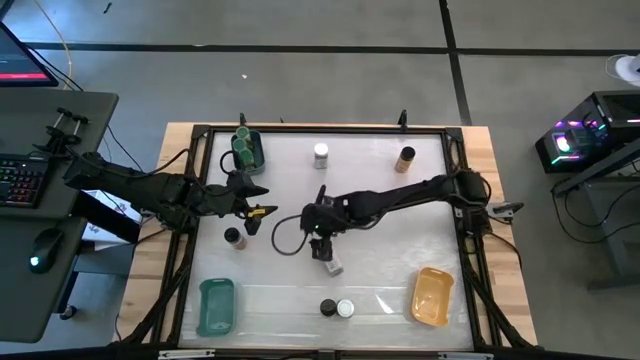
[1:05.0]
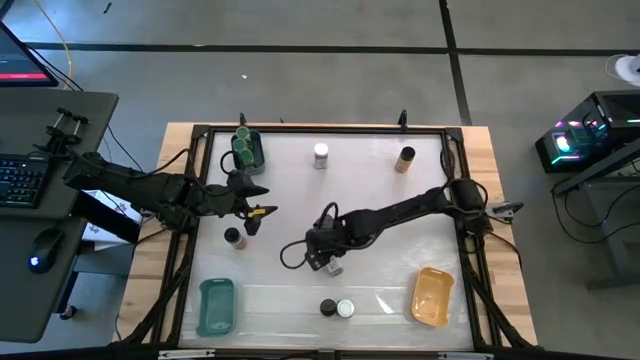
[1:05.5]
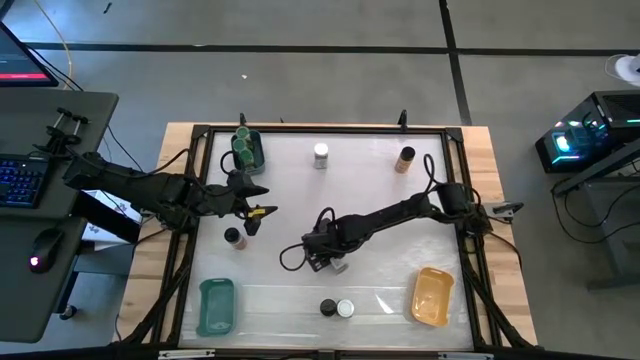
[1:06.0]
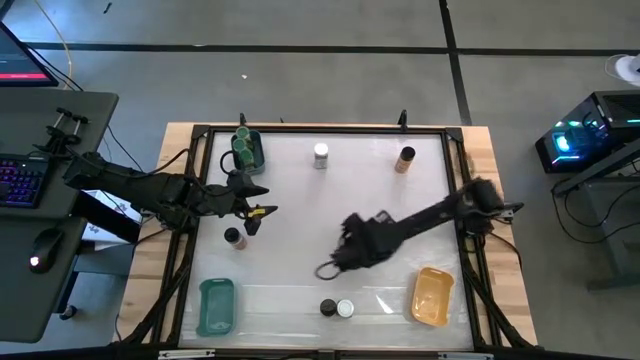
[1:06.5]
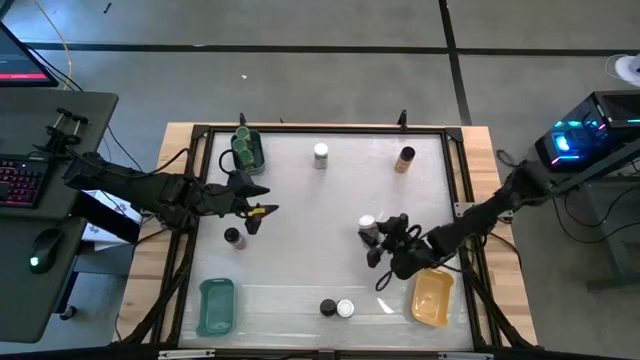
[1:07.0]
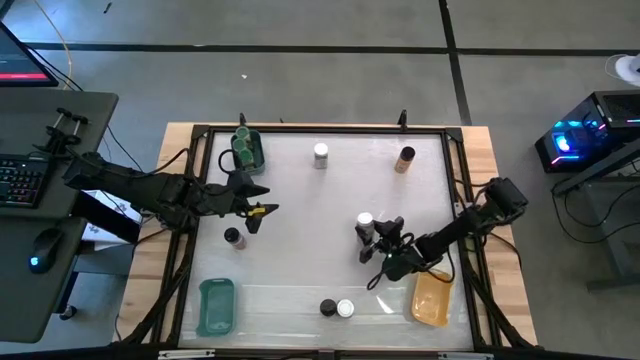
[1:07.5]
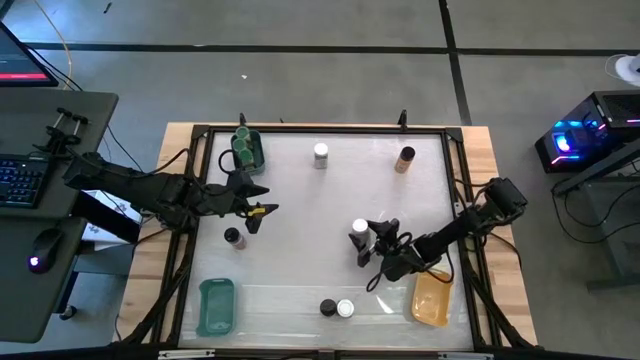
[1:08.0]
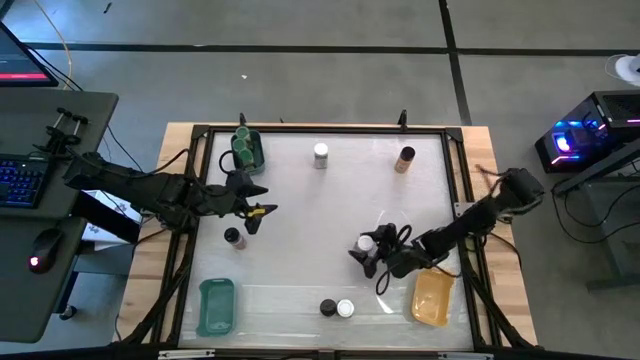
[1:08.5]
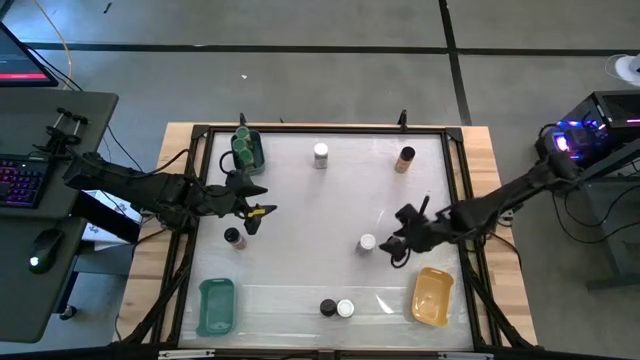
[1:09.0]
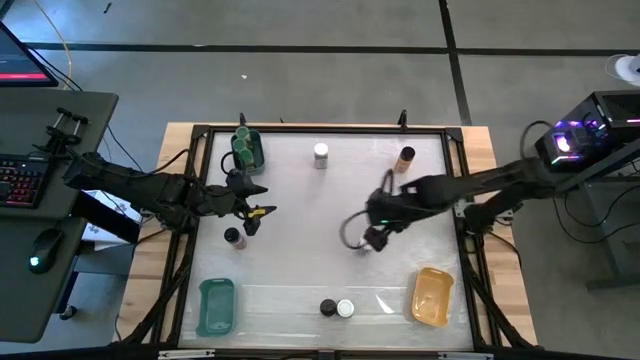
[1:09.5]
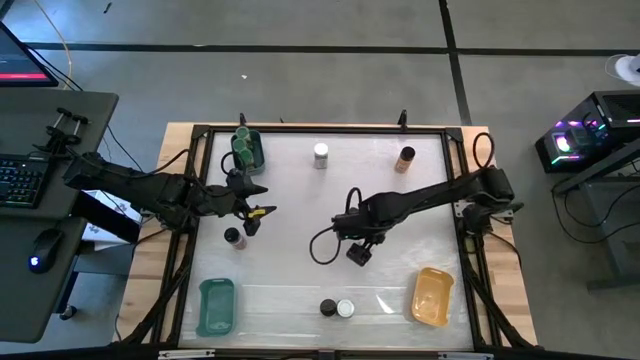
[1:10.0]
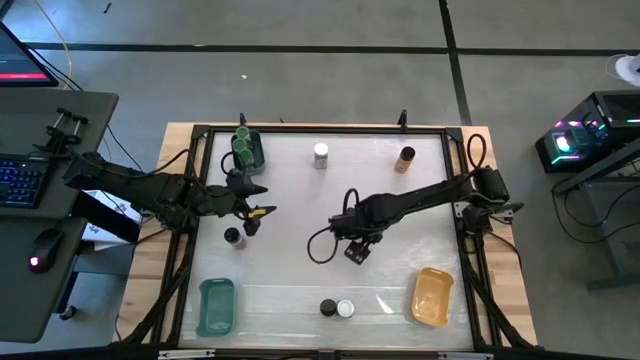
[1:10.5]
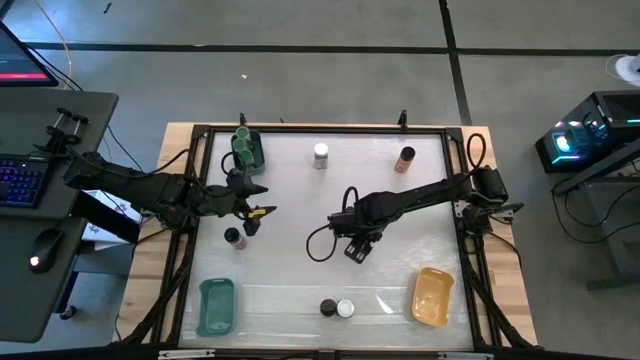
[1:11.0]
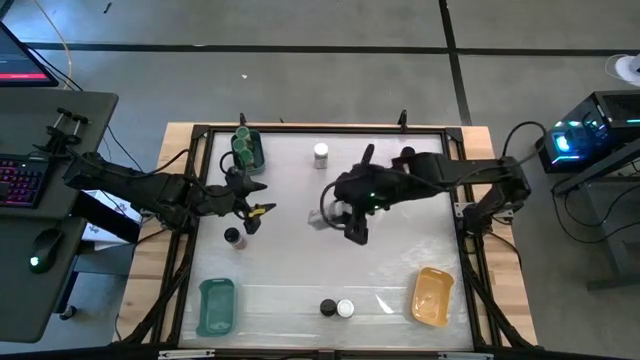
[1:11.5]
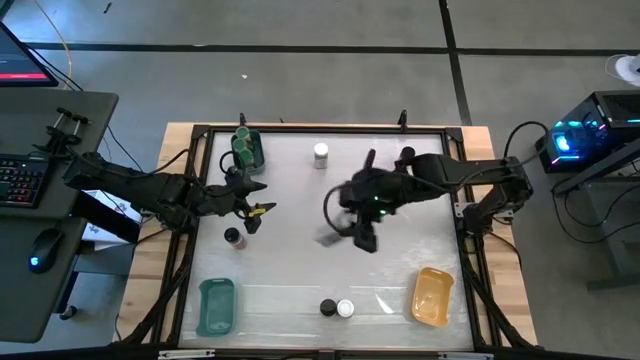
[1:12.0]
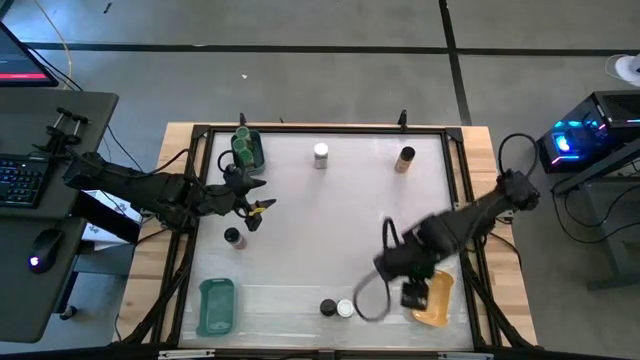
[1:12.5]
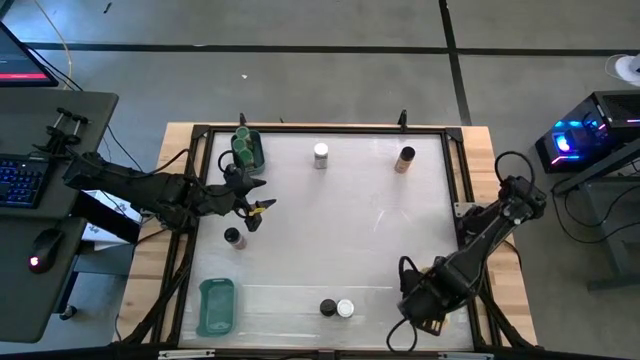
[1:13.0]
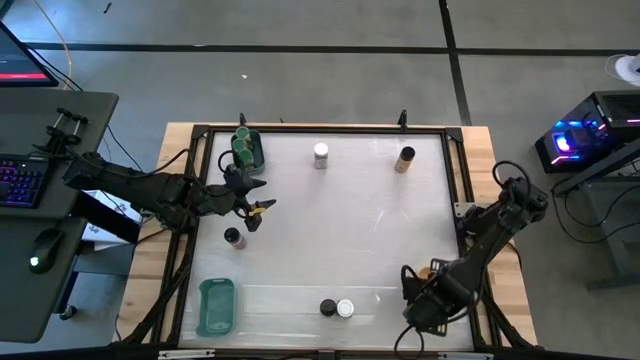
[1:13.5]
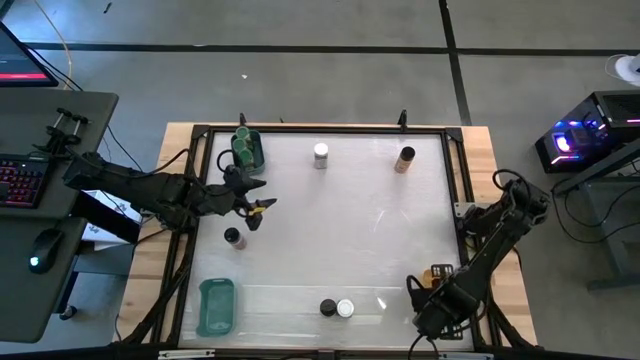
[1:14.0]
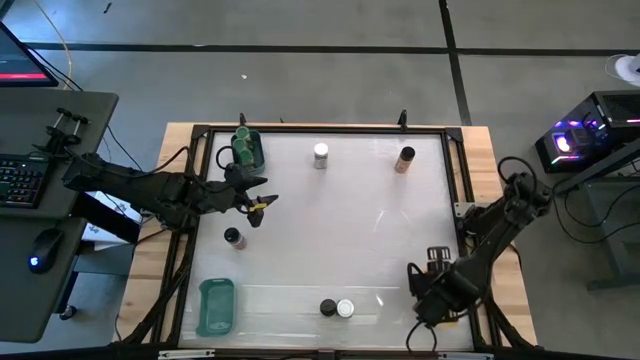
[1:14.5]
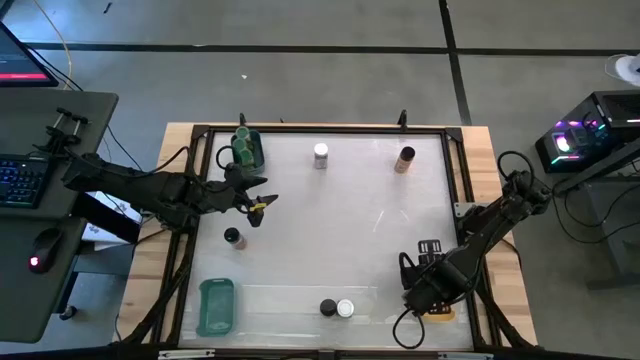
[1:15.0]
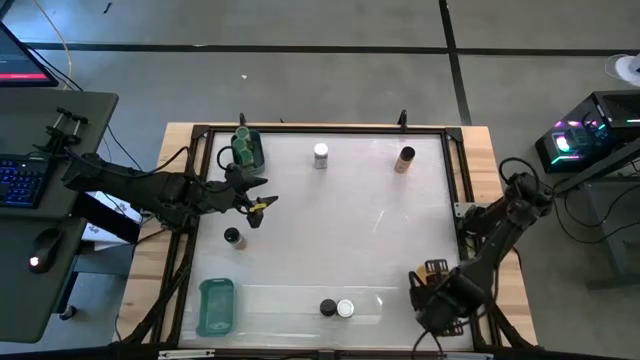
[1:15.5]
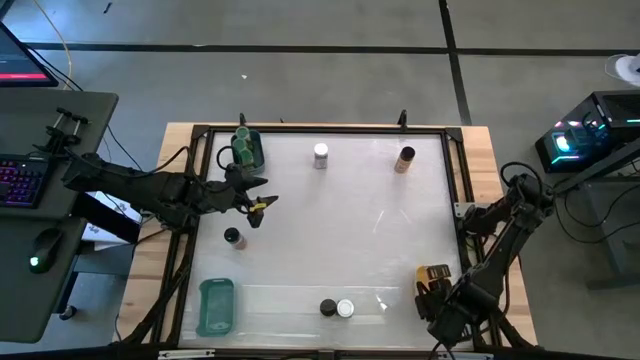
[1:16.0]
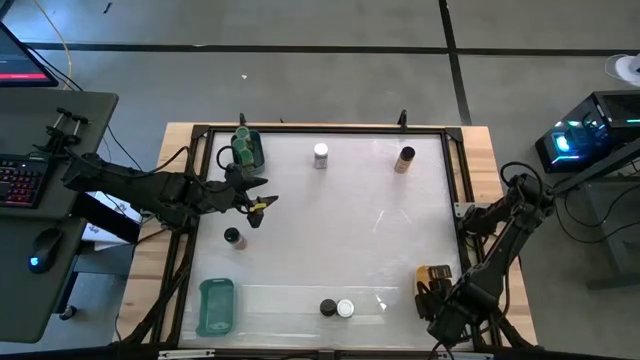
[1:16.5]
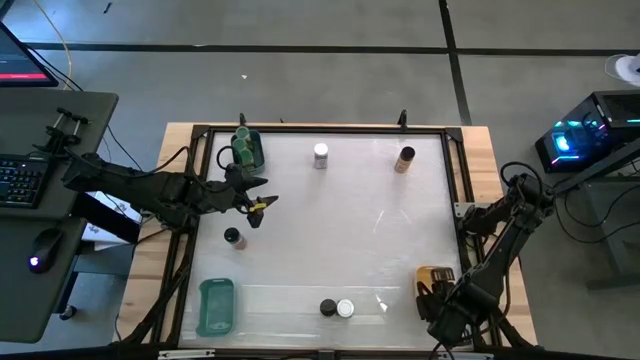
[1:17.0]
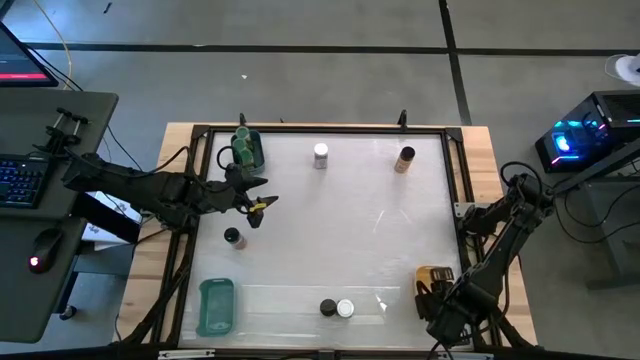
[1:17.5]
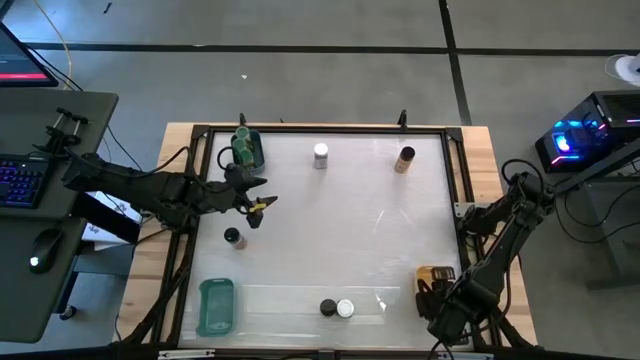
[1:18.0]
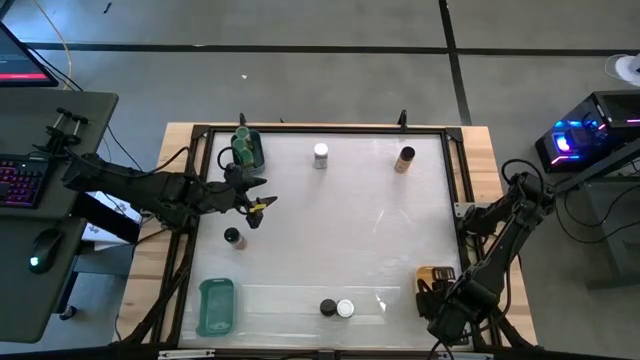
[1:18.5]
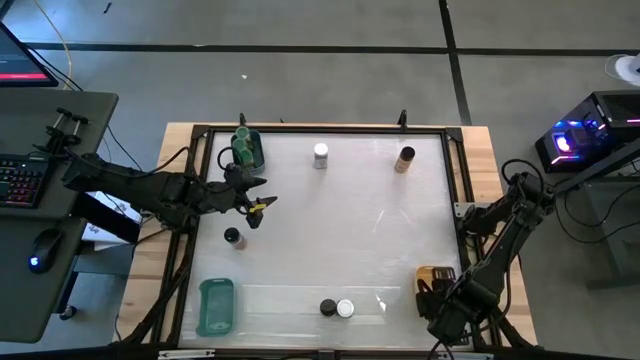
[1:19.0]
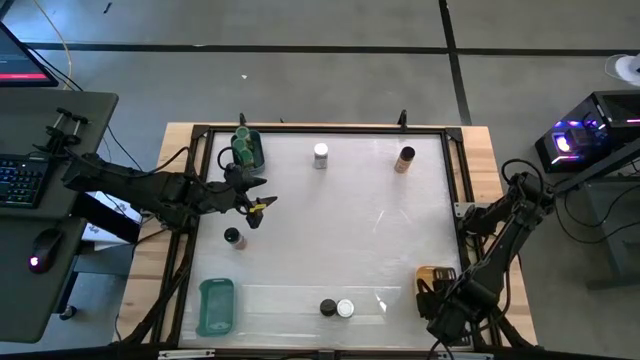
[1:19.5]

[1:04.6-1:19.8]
Task: Sort spices by type
Put the middle left white seasoning bottle into the yellow bin

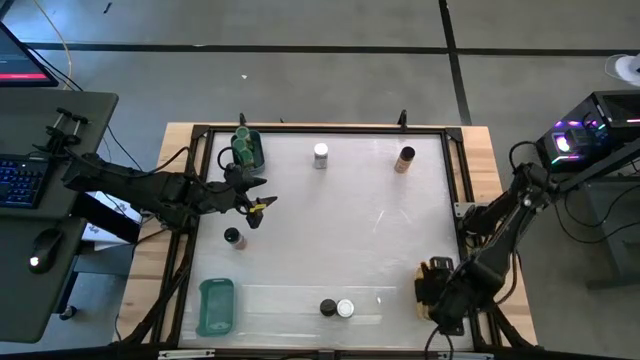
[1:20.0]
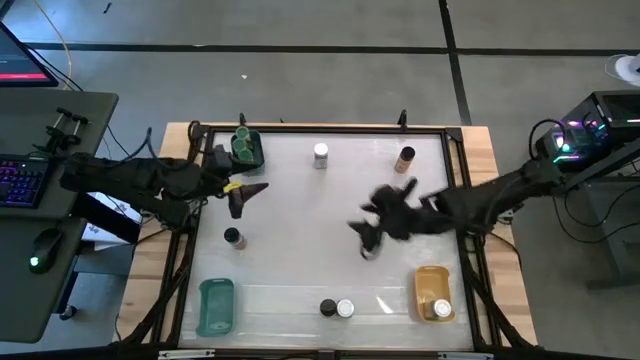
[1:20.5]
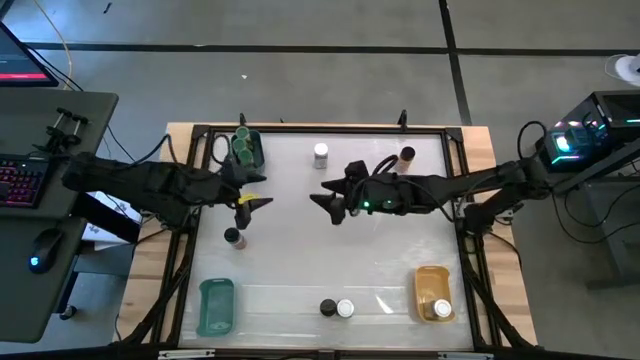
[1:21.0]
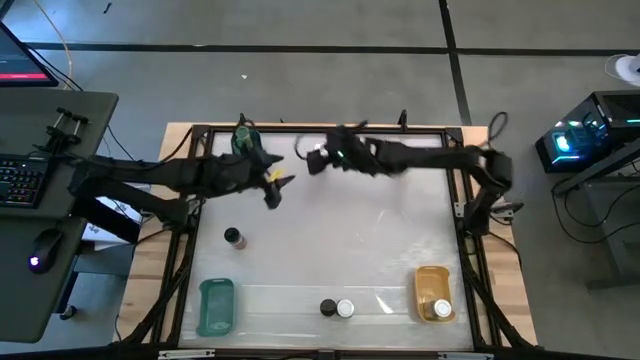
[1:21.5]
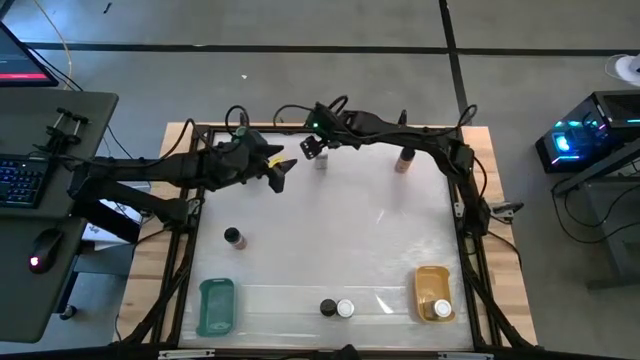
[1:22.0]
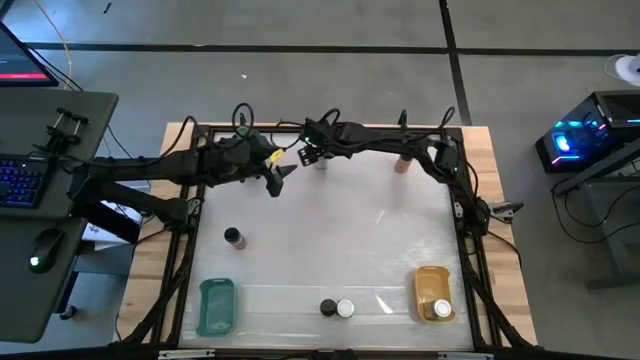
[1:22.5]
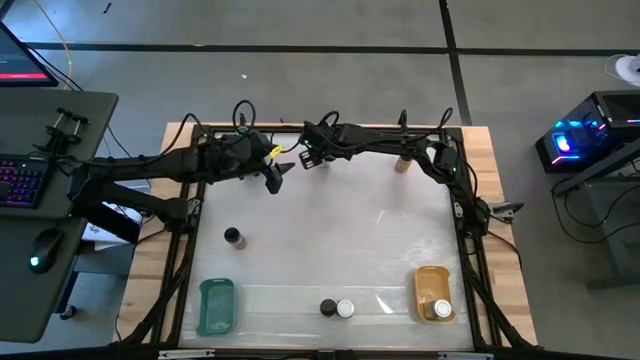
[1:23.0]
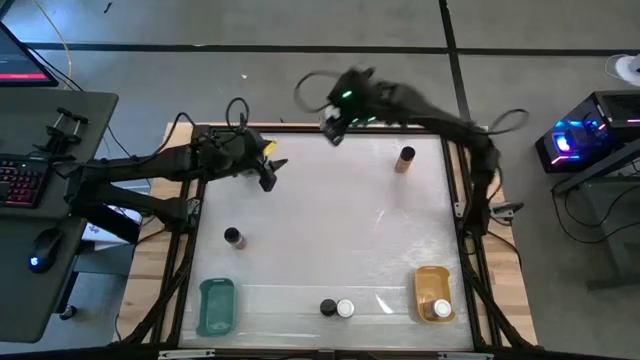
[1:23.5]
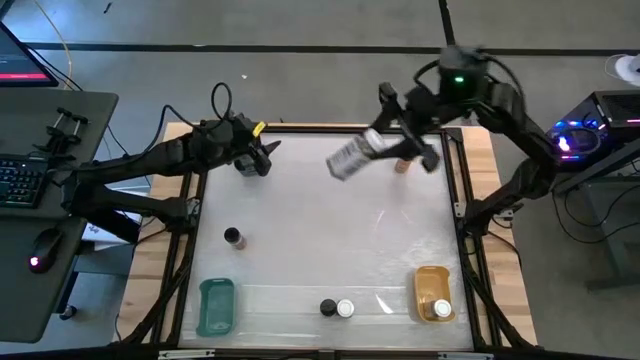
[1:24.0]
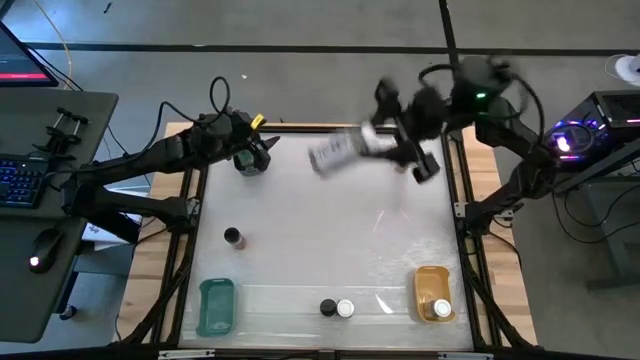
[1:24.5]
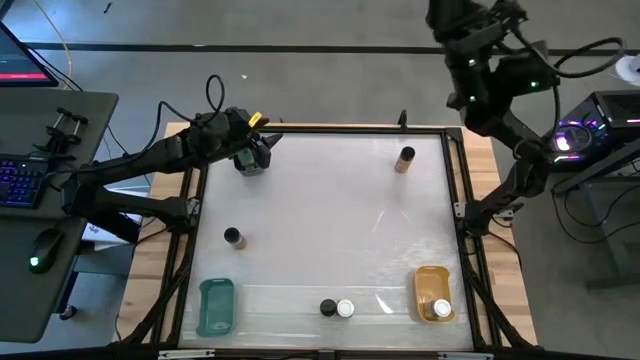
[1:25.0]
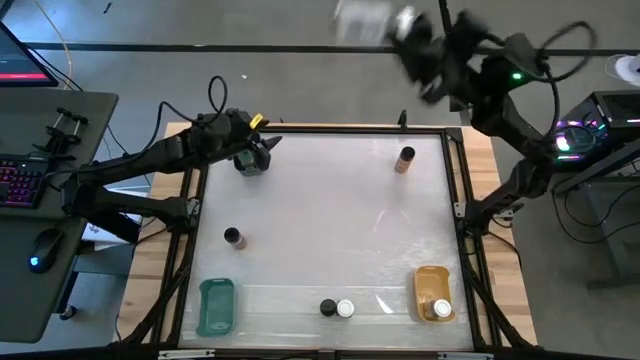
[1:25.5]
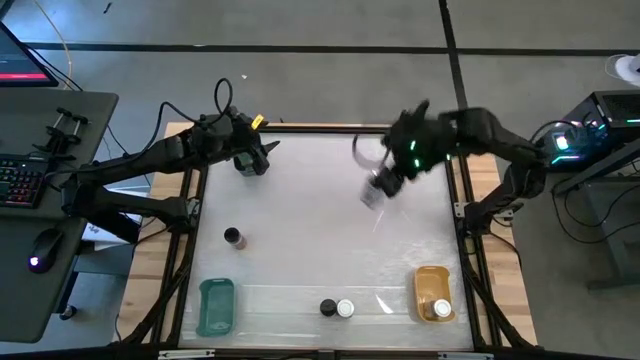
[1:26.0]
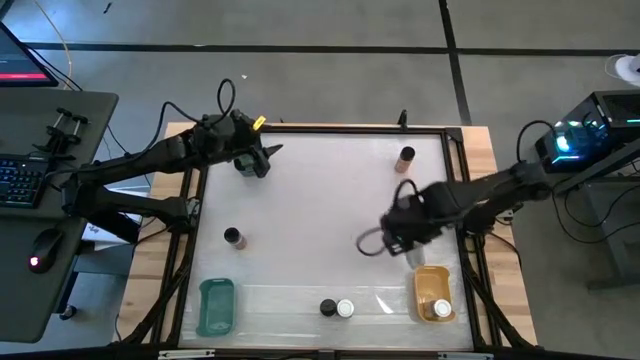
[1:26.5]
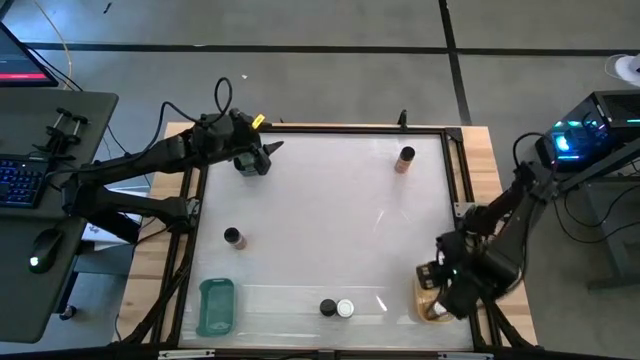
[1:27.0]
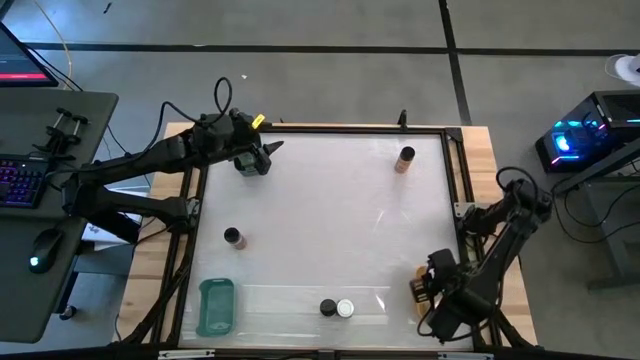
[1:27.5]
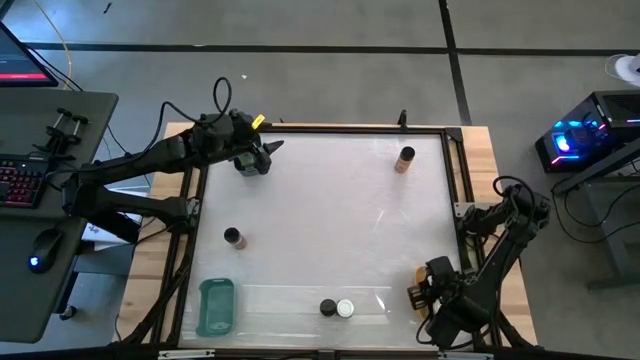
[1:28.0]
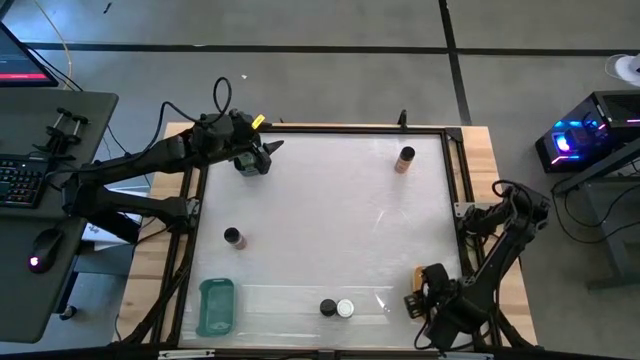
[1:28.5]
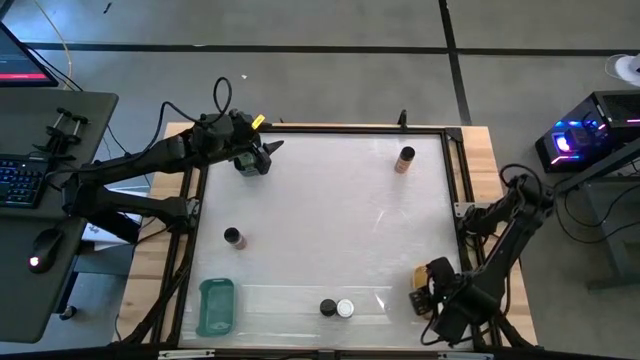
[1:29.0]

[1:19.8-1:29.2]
Put the top white seasoning bottle into the yellow bin
